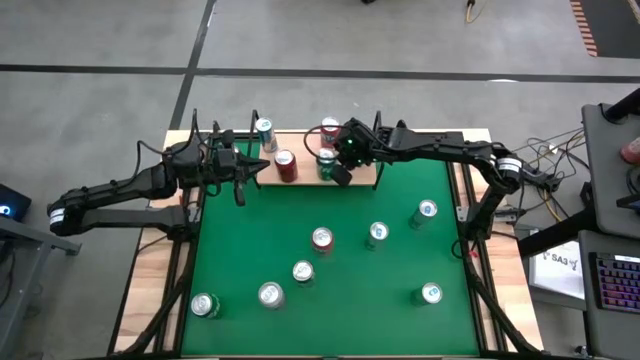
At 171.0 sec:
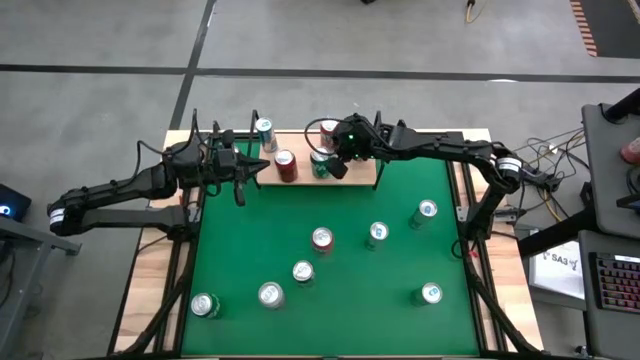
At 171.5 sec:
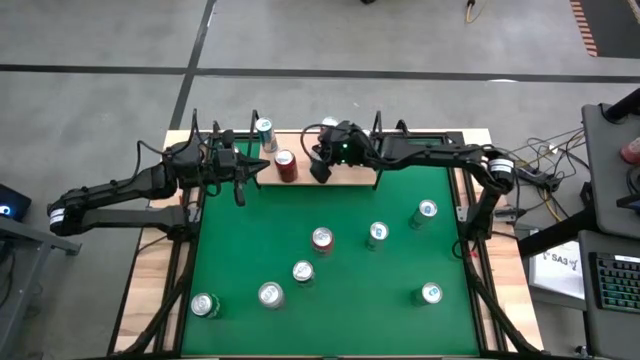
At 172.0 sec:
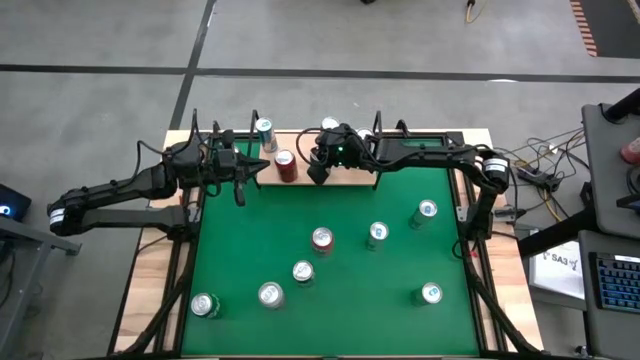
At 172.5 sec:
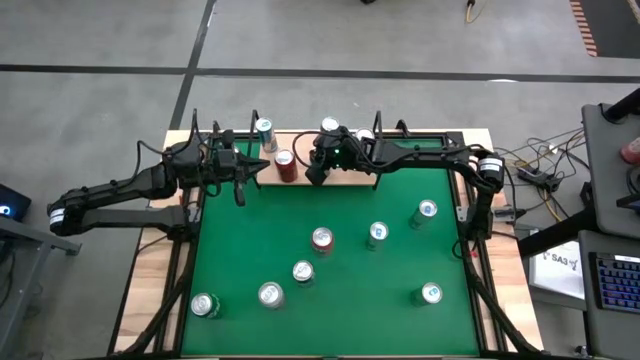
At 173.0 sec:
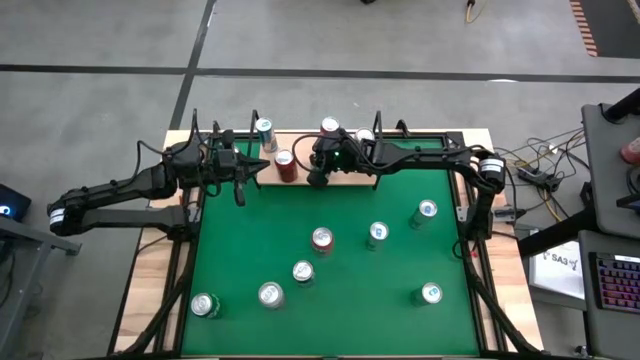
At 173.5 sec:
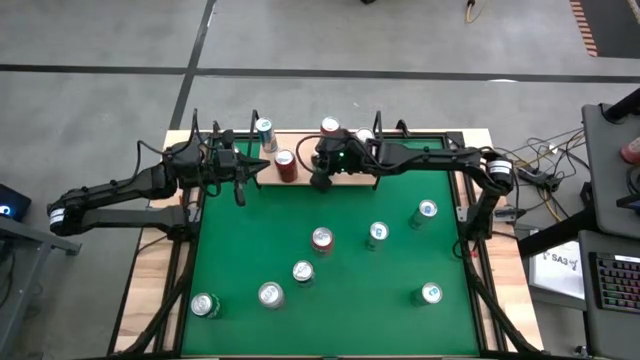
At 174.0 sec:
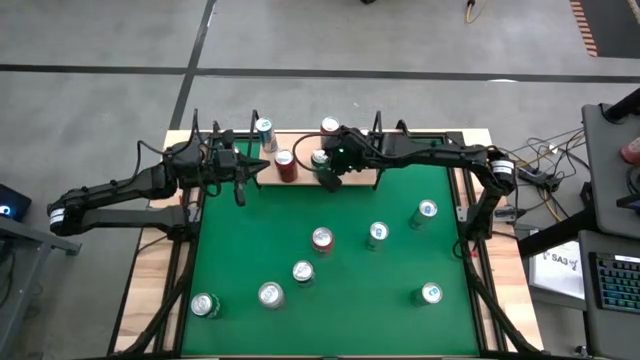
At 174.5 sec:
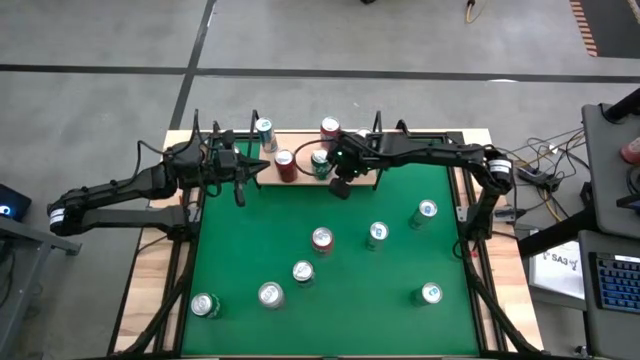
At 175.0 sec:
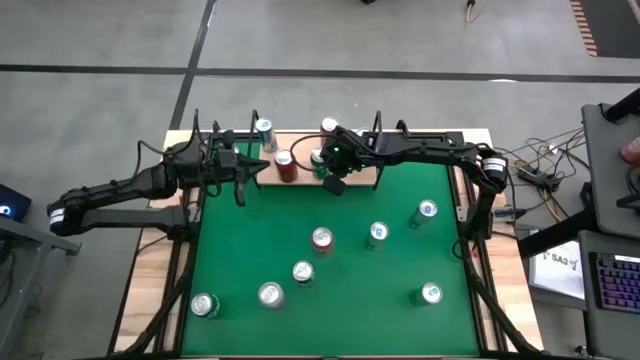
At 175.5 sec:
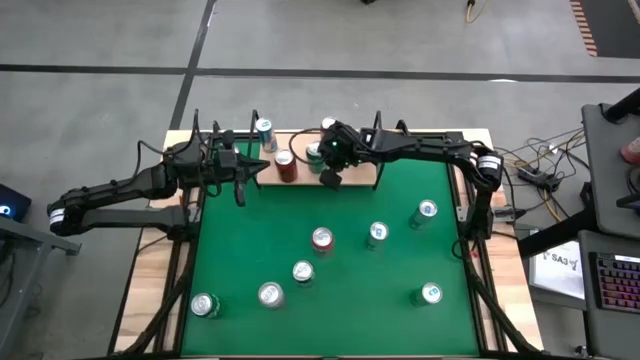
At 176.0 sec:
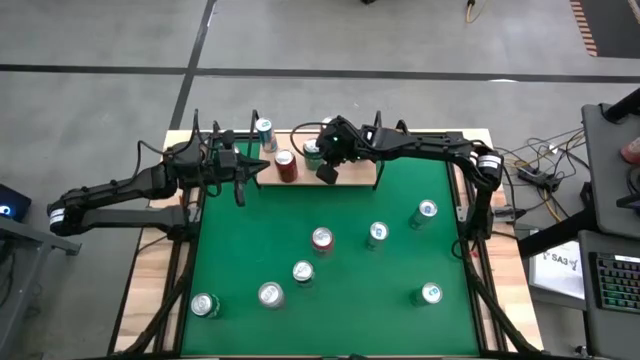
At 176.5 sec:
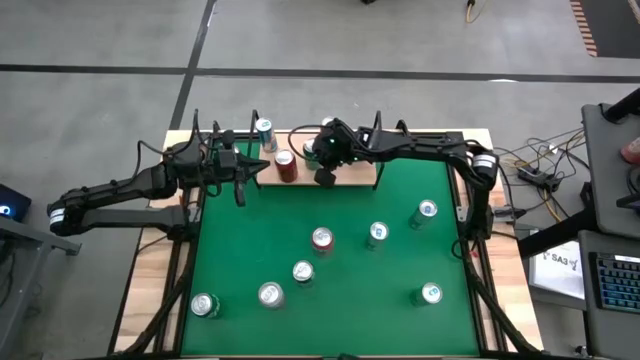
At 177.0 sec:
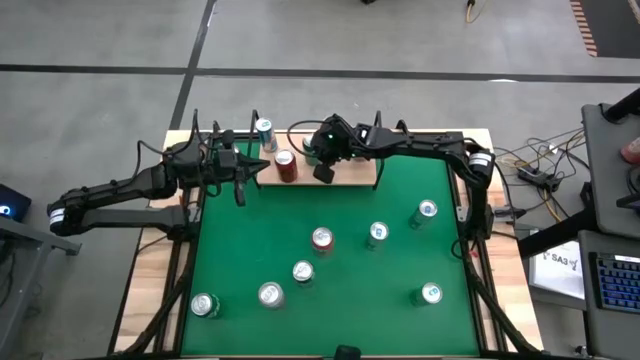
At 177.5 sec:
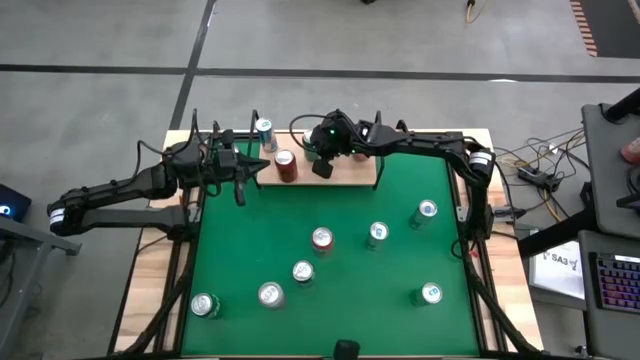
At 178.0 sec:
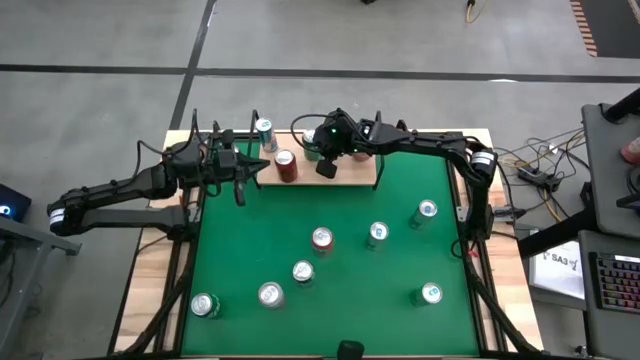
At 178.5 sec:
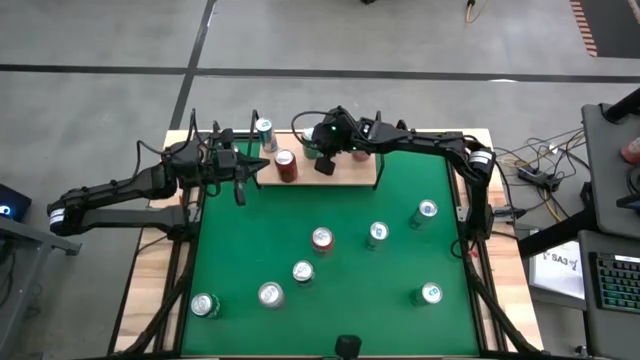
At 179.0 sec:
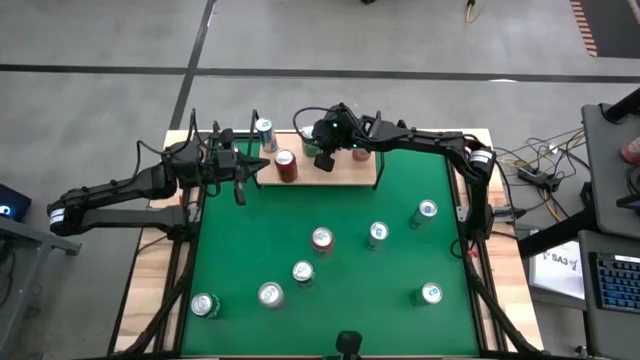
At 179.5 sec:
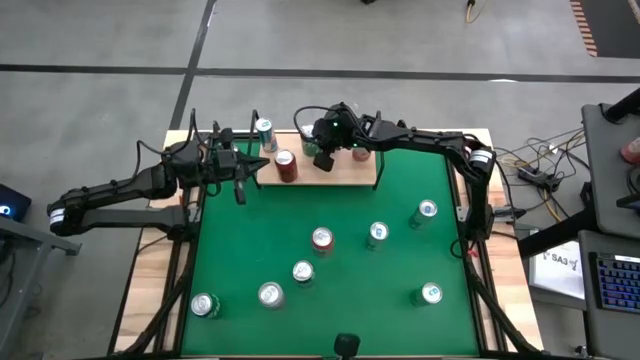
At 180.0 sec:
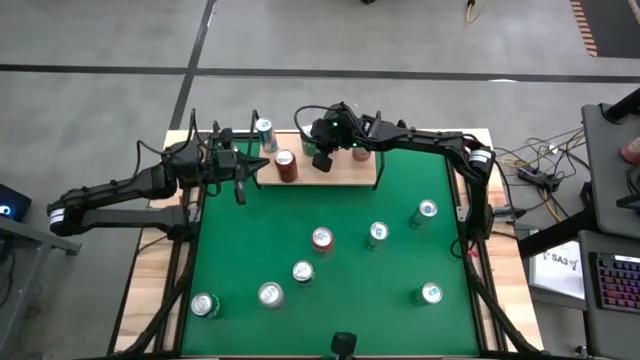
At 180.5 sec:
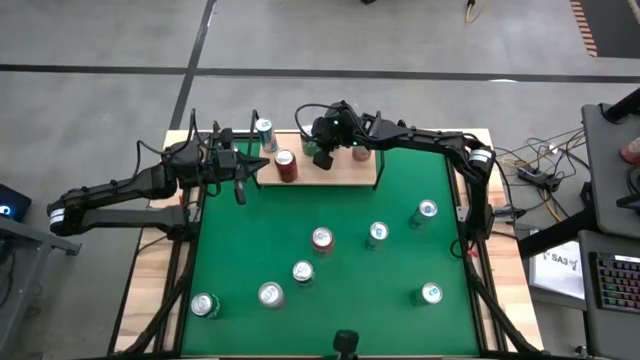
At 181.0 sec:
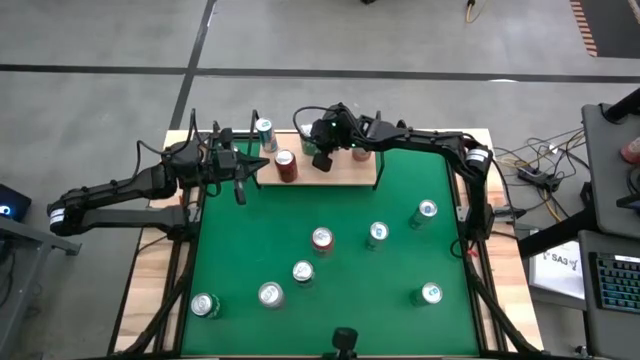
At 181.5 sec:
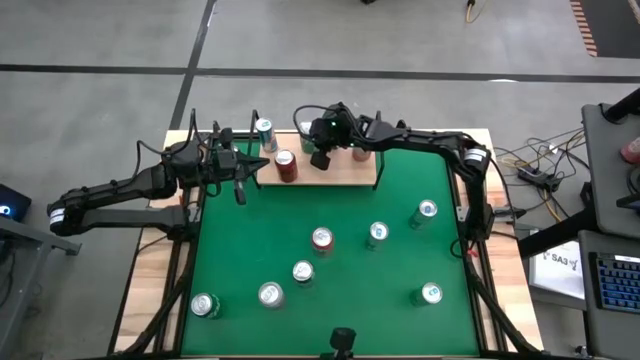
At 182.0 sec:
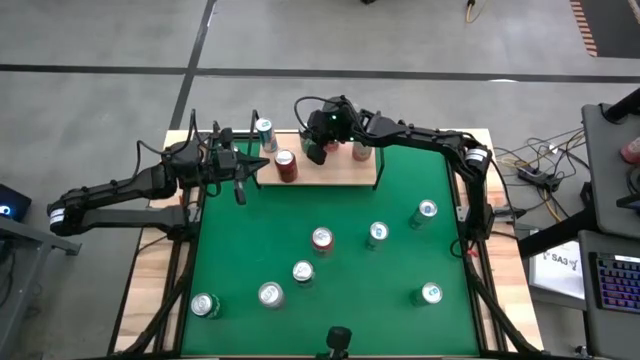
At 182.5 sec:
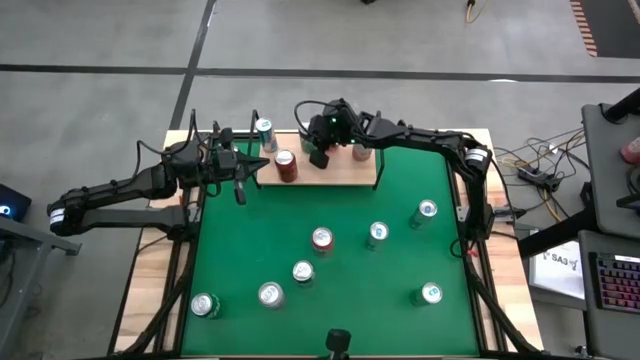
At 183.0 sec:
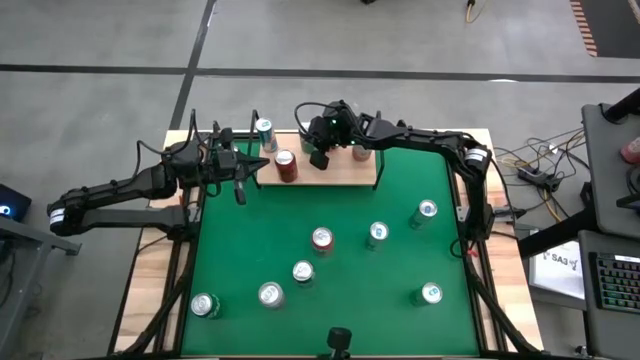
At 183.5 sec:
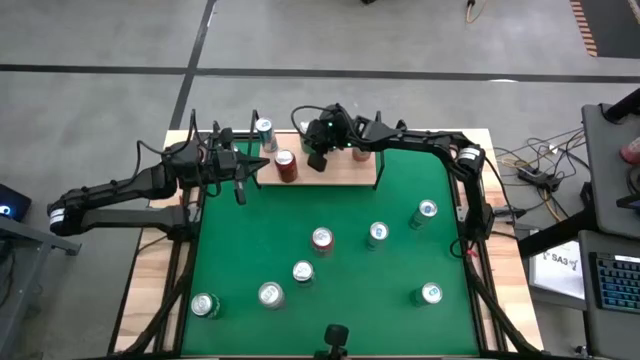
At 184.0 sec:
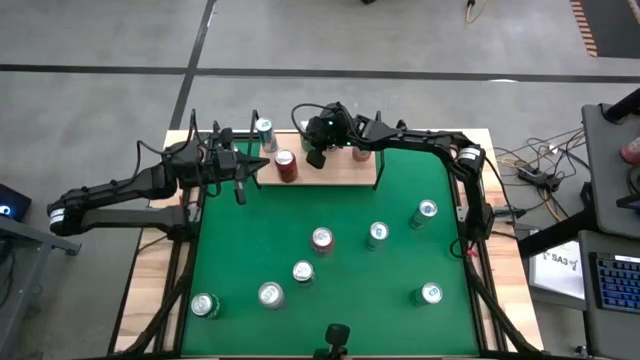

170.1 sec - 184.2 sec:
Task: Pick and place cans onto a shelf
Put the right green soda can on the shelf

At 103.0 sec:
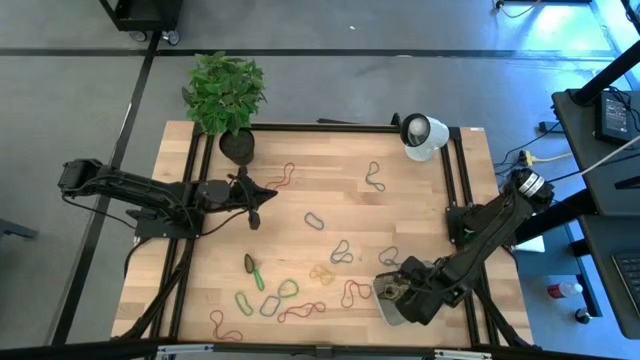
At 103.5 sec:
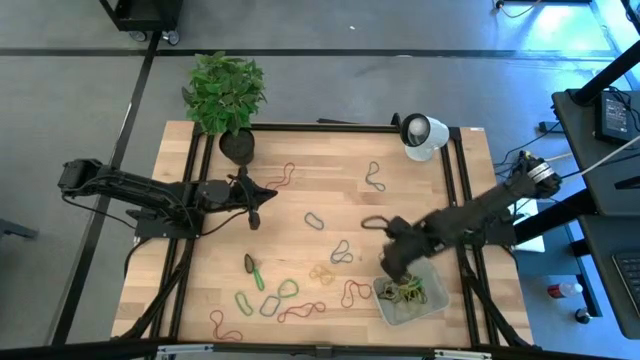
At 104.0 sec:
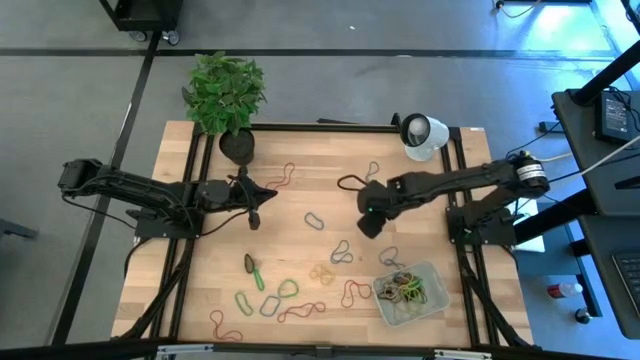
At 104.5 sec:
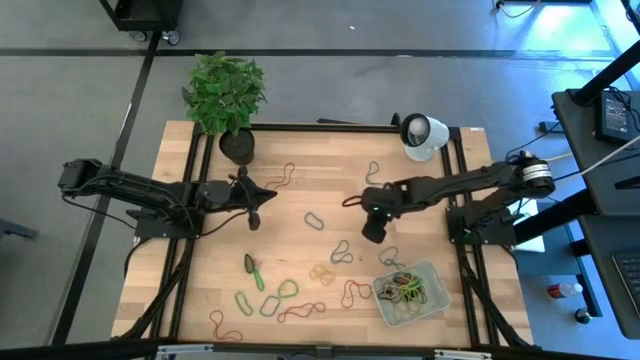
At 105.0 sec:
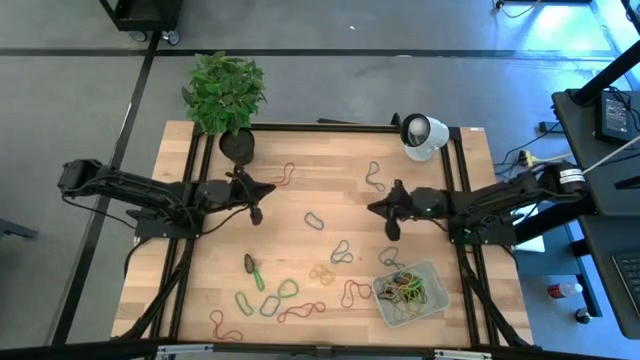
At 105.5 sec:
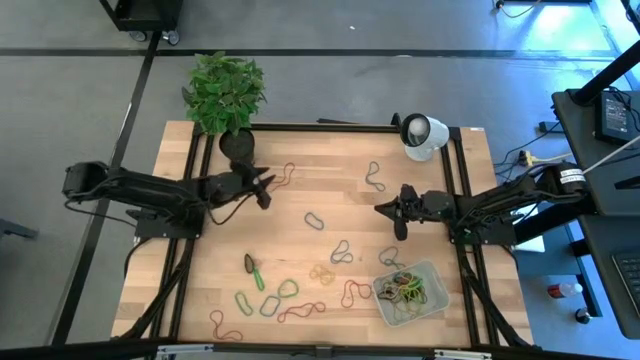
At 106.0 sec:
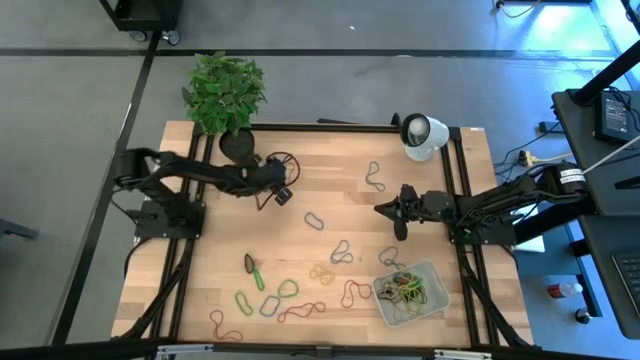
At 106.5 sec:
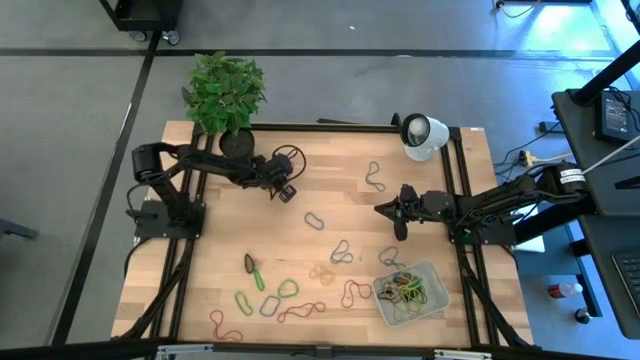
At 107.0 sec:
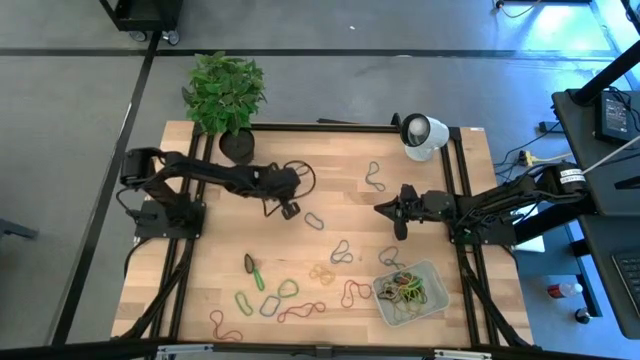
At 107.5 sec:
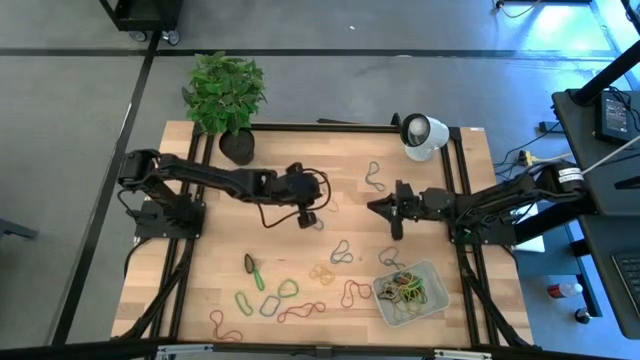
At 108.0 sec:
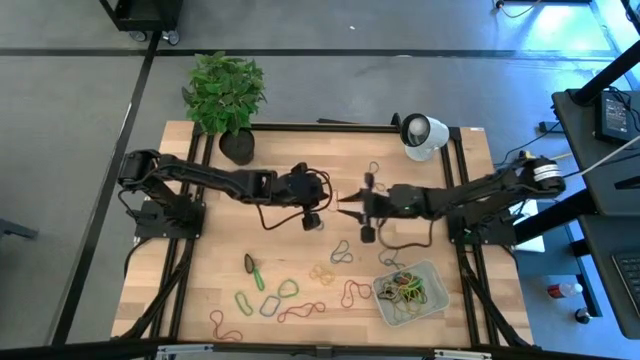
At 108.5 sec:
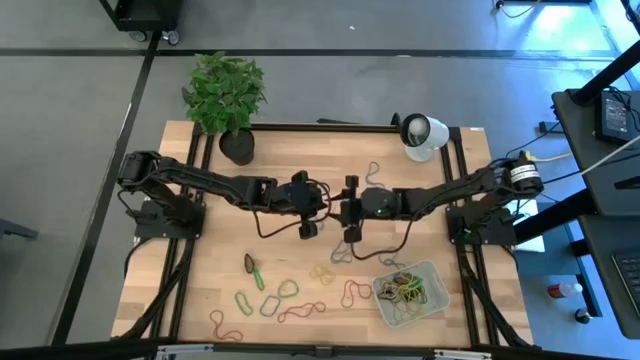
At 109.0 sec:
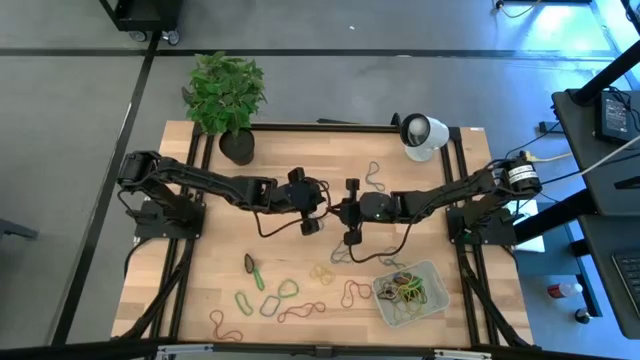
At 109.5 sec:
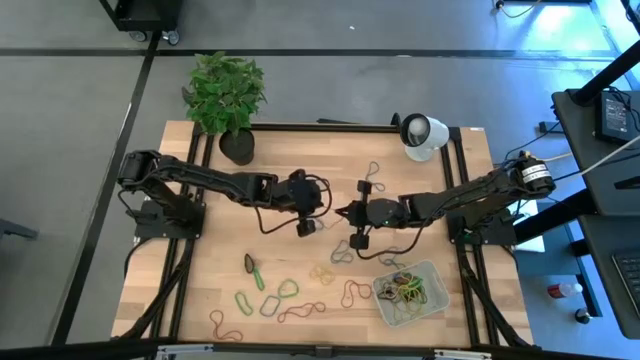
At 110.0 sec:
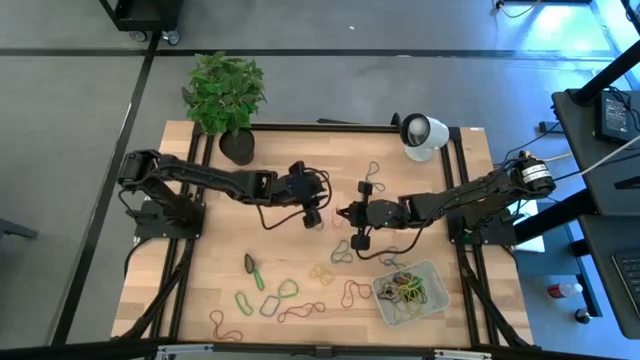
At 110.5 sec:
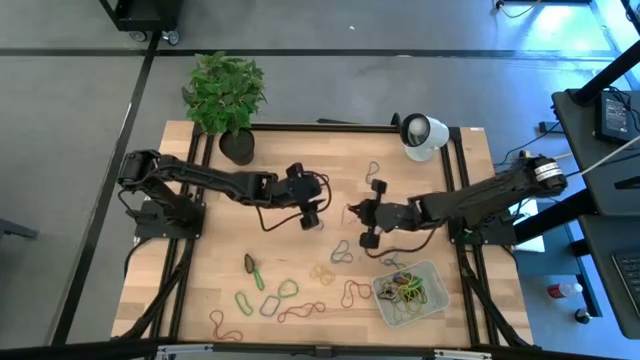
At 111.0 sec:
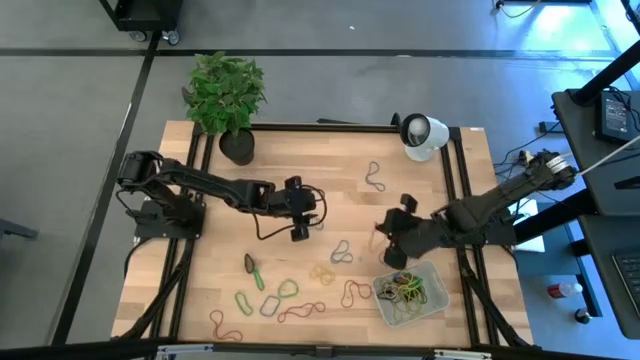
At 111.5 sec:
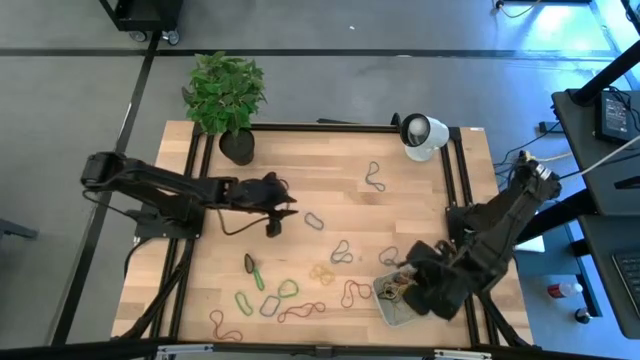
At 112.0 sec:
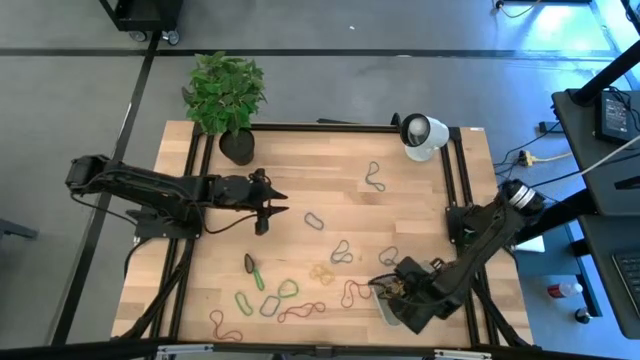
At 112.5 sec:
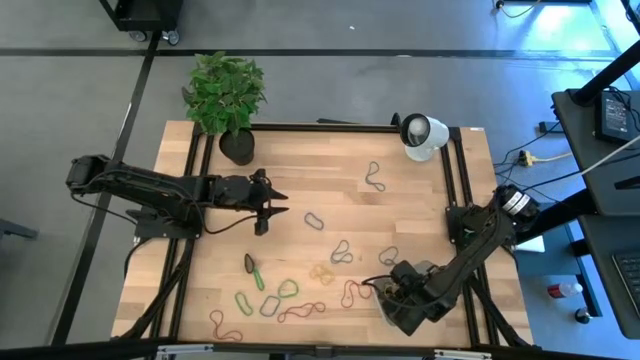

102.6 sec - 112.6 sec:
Task: Pick and place rubber bands into bin
Put the red rubber band into the white bin
